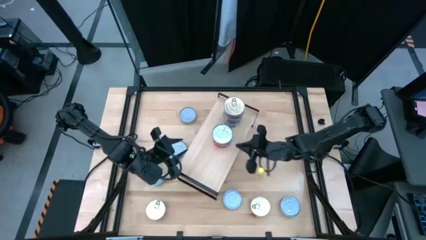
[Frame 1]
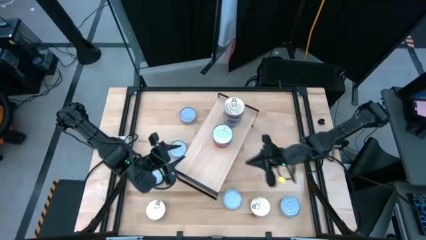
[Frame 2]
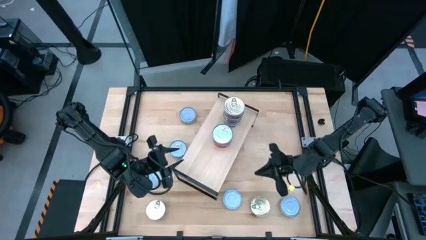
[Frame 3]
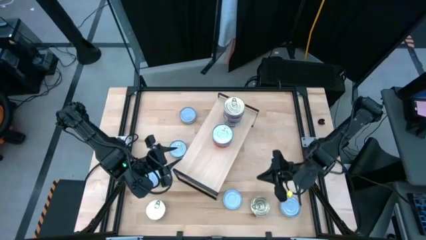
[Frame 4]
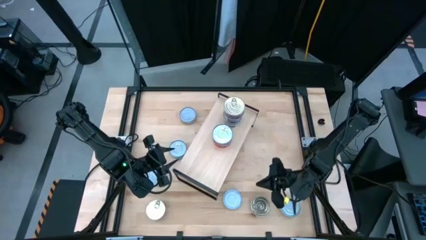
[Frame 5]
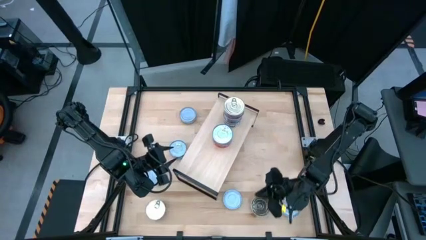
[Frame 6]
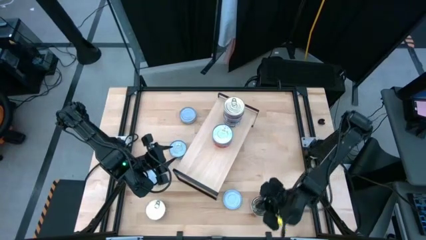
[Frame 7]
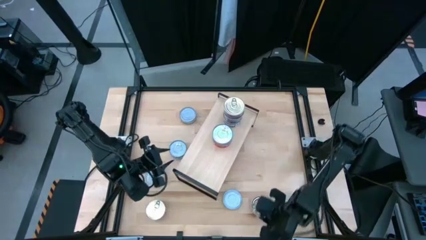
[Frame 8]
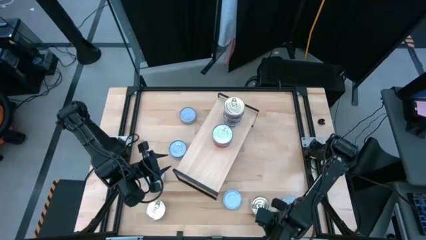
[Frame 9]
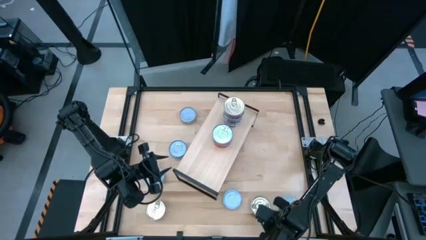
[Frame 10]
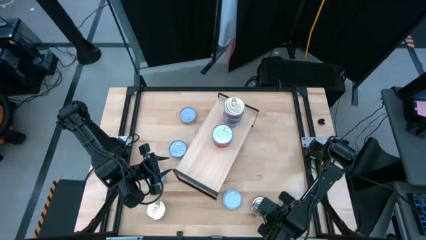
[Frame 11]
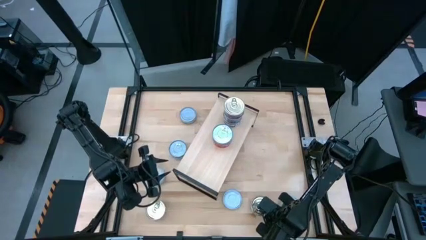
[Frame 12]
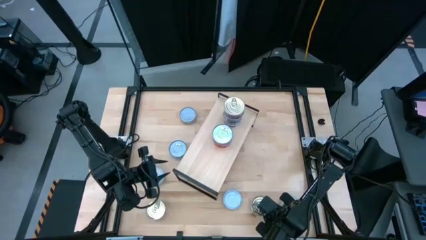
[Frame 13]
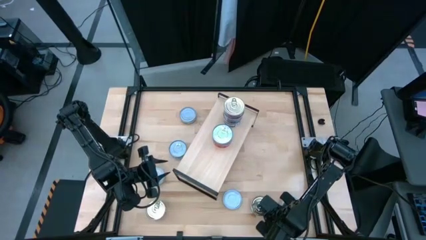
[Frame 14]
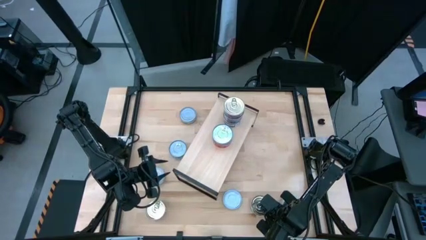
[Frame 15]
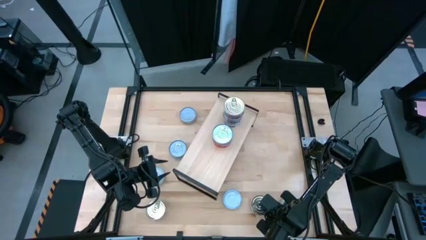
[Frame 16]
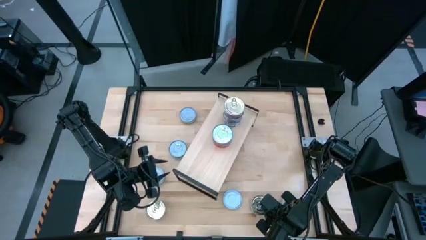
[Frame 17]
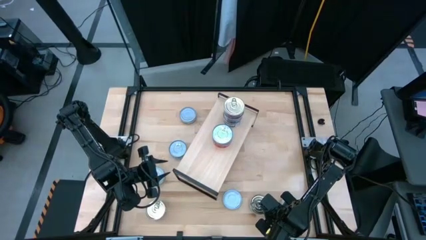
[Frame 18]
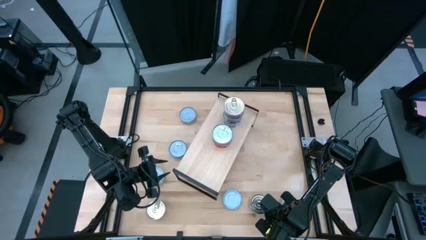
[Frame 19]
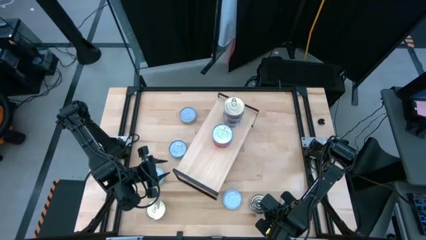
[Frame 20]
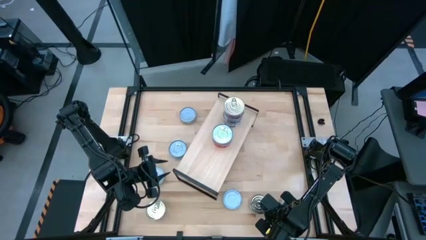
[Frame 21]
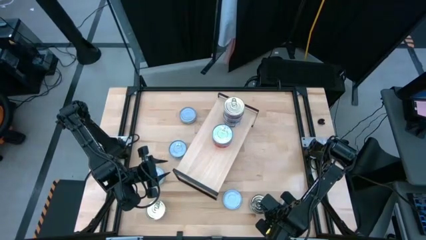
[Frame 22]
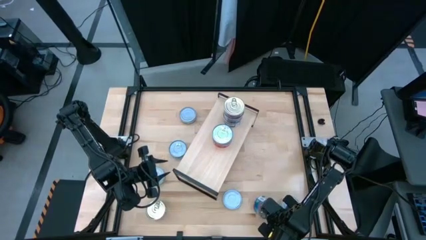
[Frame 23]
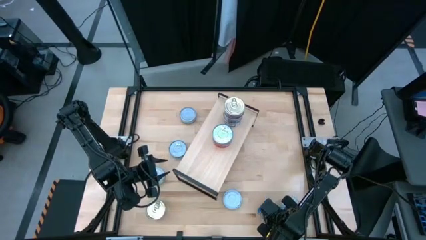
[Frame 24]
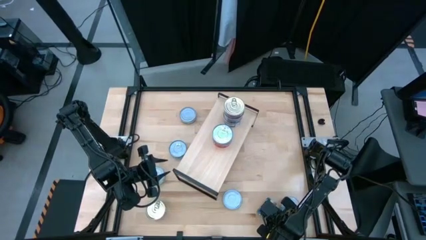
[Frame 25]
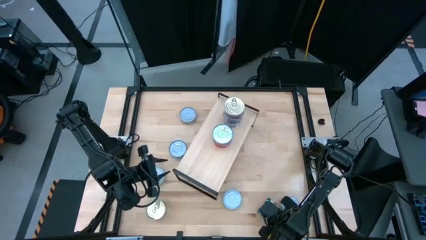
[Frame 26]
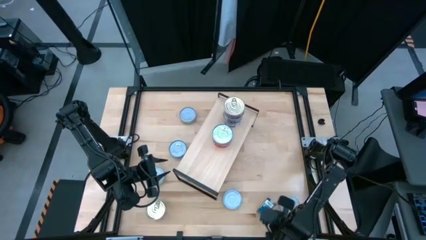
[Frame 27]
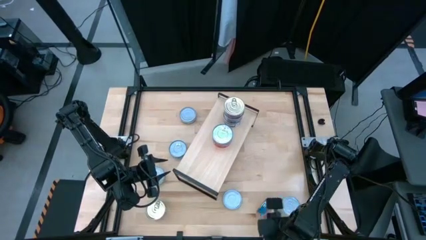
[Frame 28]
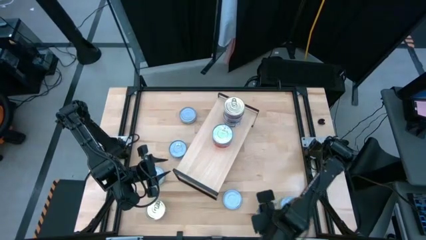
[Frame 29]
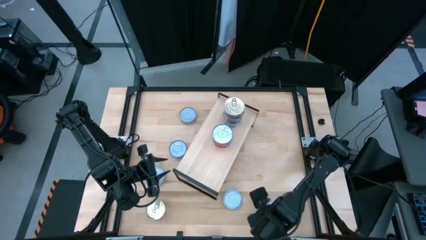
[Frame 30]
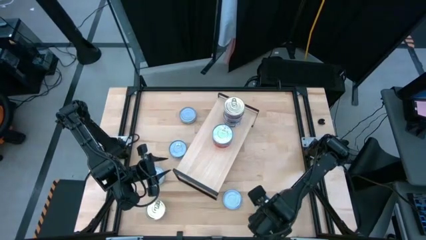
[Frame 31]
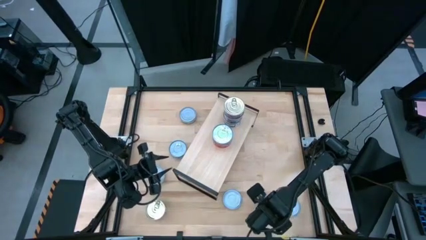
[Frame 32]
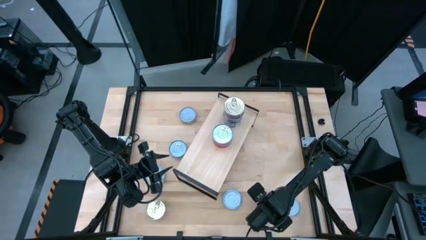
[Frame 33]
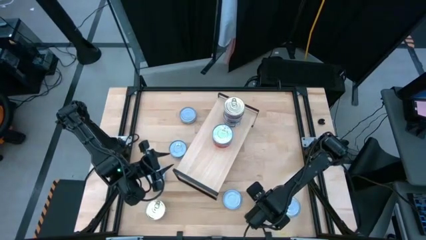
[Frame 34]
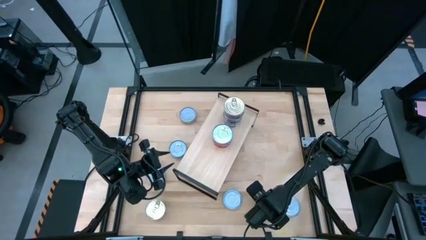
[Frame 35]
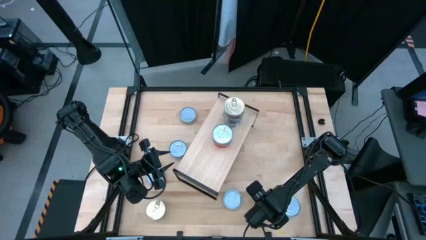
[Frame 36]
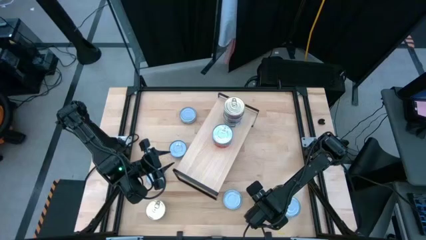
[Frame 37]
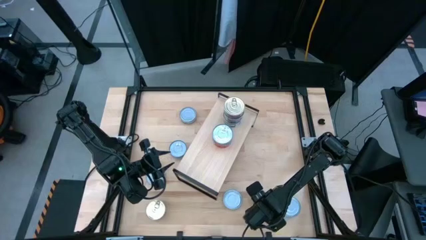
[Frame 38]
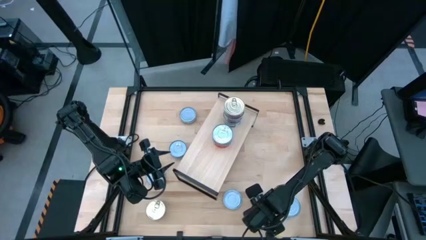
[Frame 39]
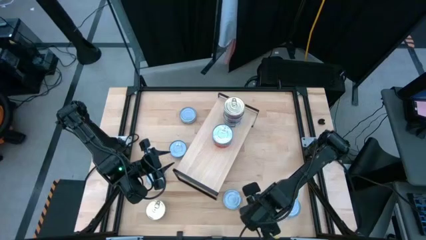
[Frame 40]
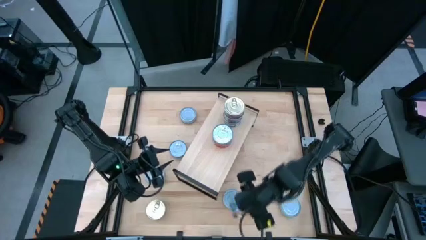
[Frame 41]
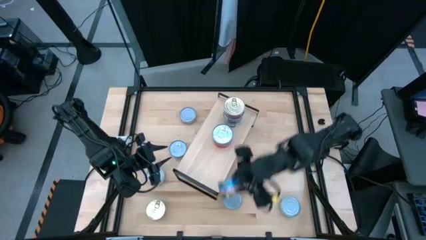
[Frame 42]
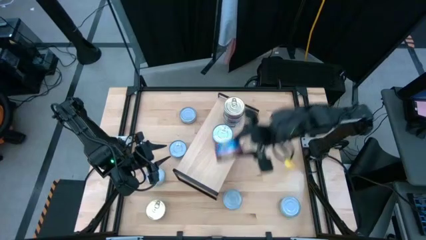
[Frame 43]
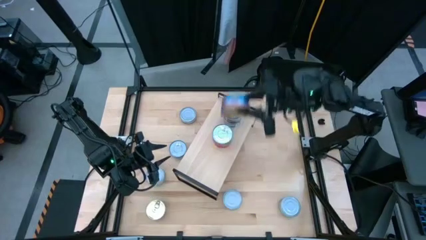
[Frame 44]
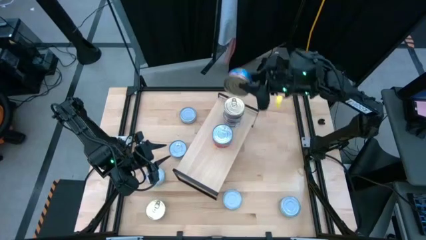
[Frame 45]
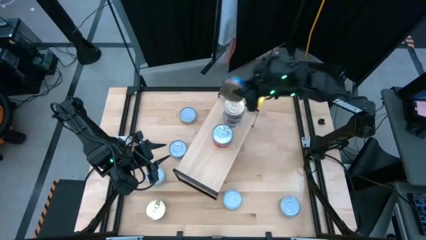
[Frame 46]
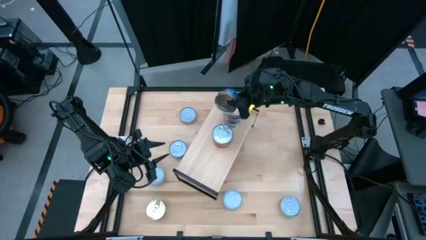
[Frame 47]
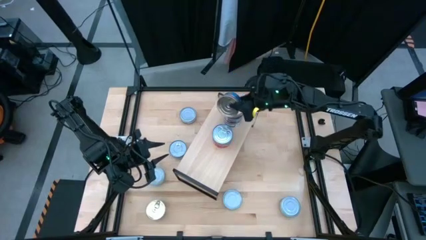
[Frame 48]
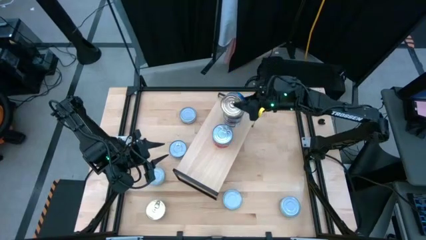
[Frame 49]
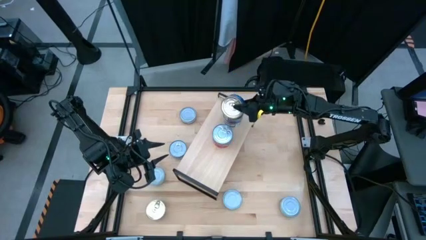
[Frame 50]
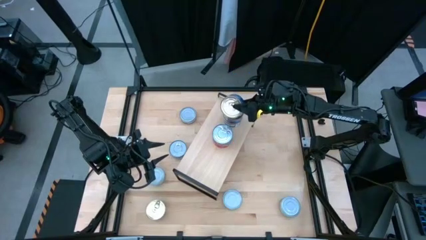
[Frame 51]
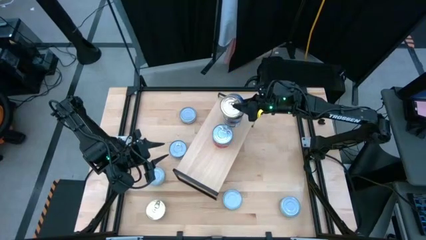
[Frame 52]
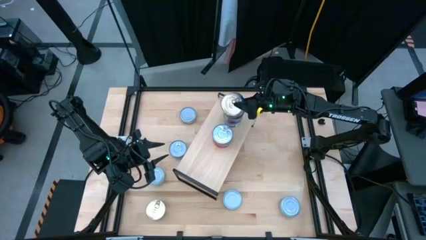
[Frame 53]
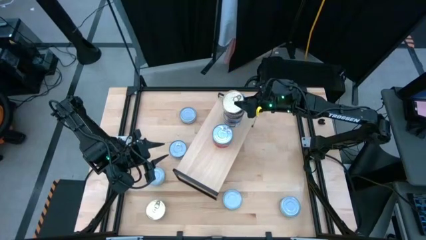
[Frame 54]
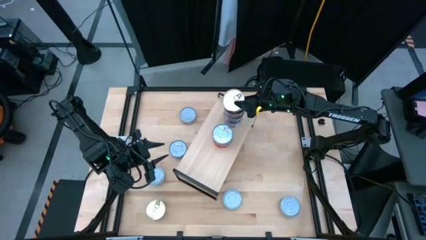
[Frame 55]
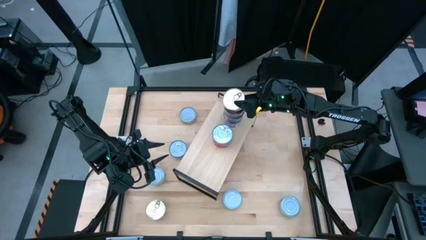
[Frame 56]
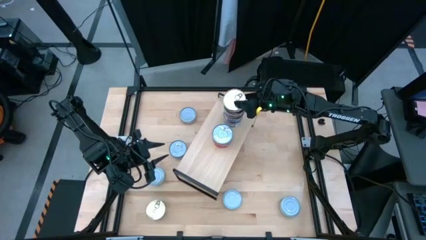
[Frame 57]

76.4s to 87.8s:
Task: Stack canned seafood by type on shelf
Stack the blue tuna can on top of the blue tuna can on the shelf

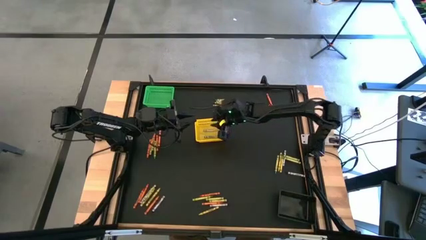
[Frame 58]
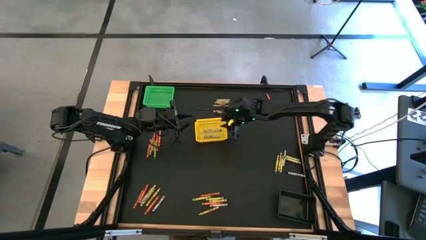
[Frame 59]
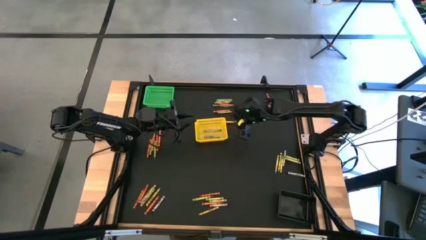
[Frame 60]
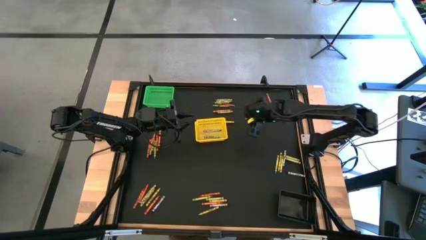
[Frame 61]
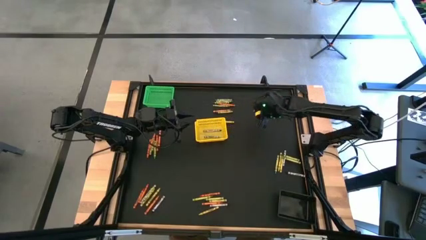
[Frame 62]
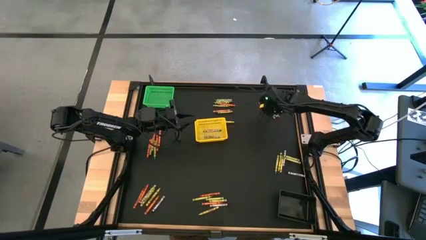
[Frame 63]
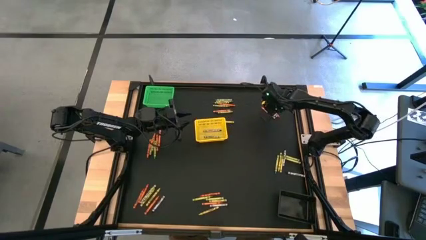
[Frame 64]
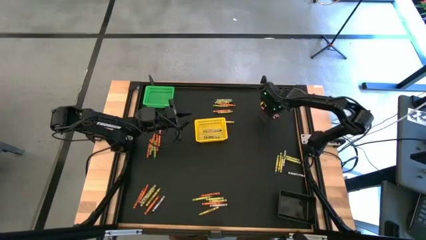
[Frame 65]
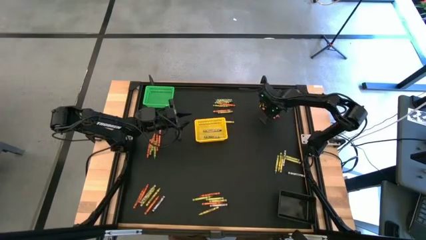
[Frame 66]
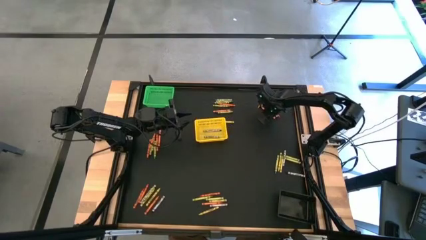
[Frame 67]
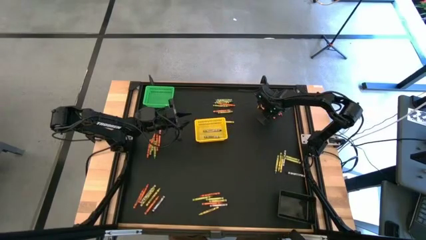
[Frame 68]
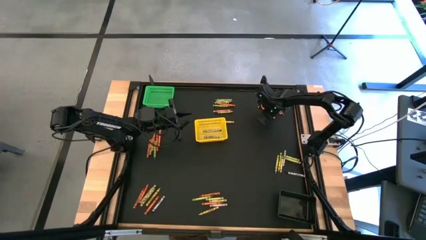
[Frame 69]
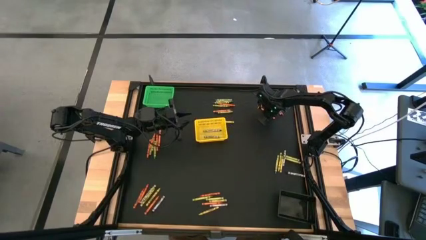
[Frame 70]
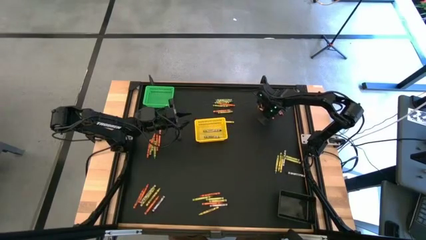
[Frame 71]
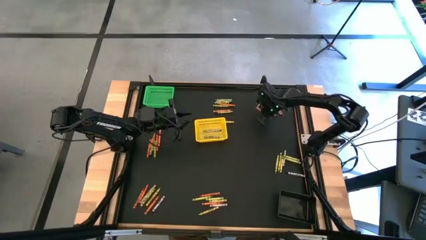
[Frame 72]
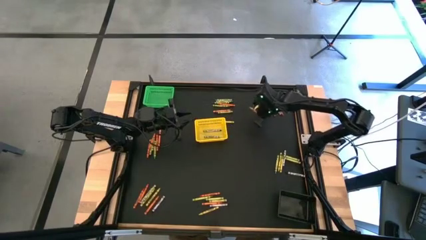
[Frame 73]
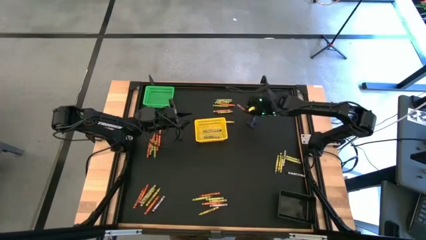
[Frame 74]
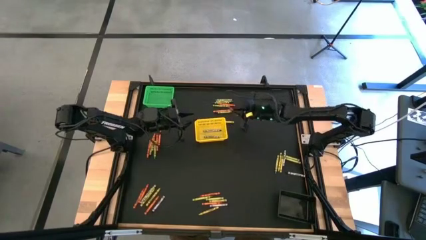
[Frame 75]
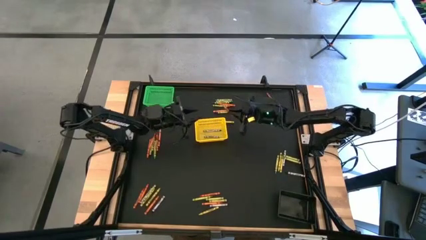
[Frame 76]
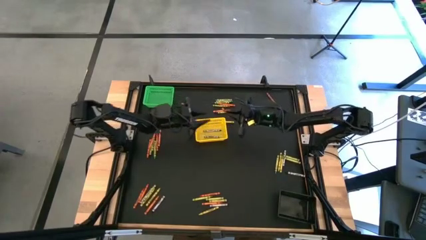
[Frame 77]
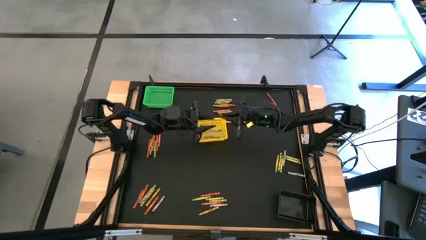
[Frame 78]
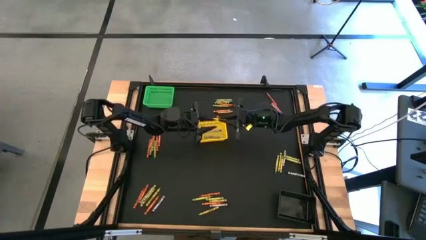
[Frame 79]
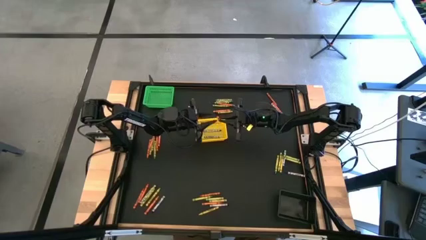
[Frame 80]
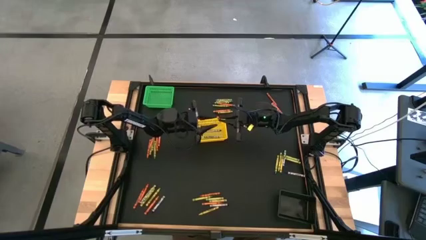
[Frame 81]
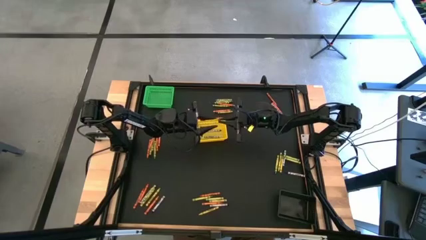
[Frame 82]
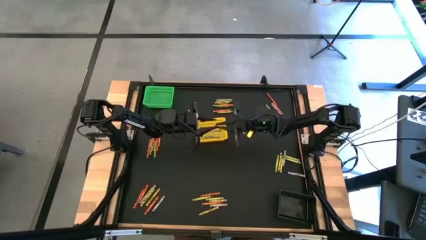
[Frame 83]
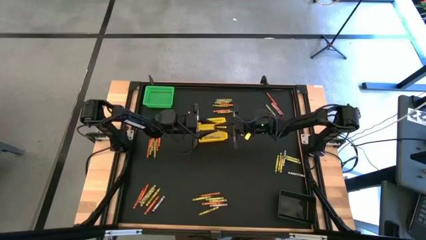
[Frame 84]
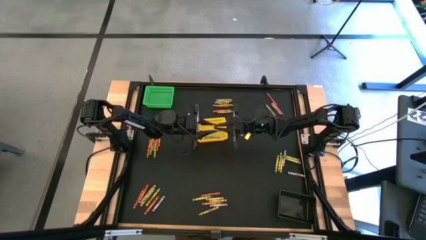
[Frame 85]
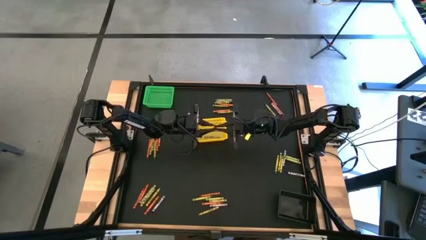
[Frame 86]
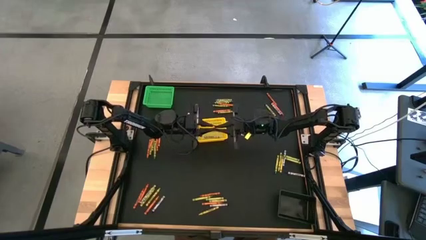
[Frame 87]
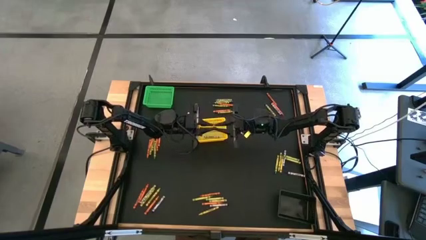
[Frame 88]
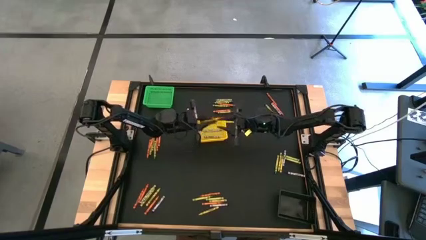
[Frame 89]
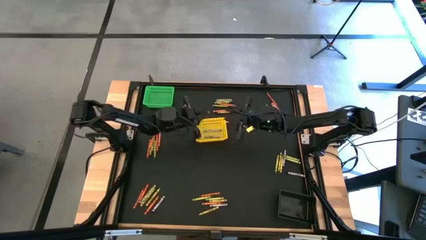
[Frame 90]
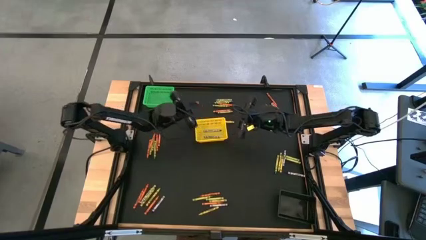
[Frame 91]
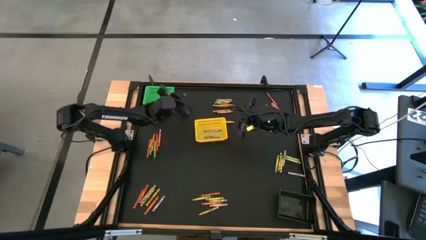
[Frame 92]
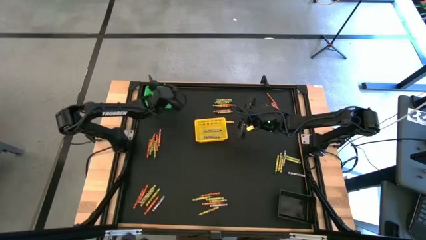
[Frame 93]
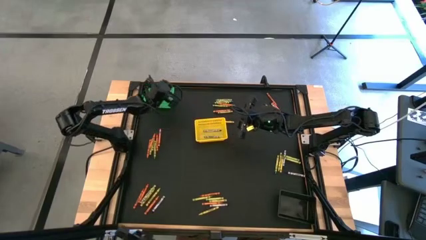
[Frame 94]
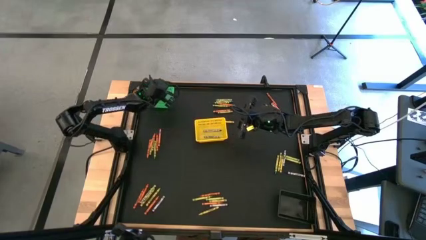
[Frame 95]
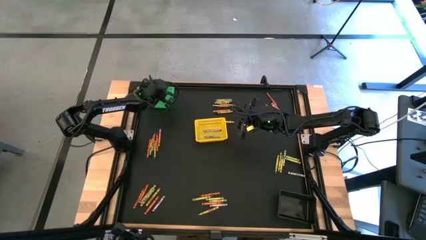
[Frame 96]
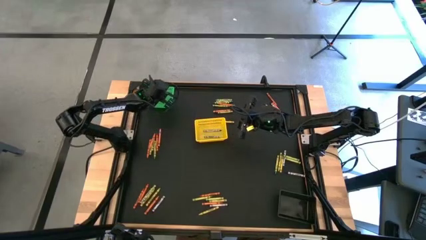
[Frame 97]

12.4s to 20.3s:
Task: Sort crayons
Put the orange crayon into the green bin
